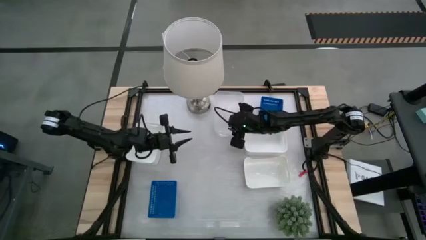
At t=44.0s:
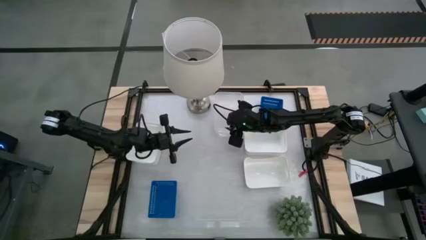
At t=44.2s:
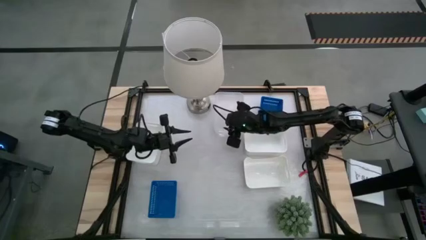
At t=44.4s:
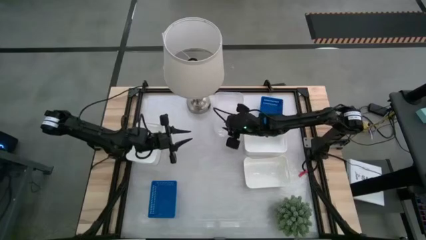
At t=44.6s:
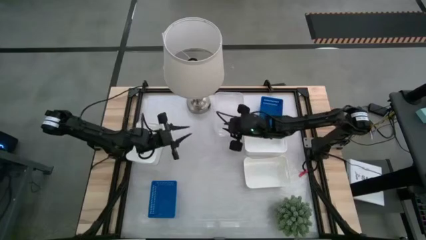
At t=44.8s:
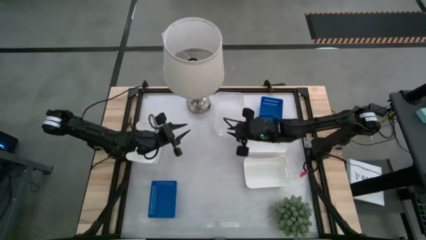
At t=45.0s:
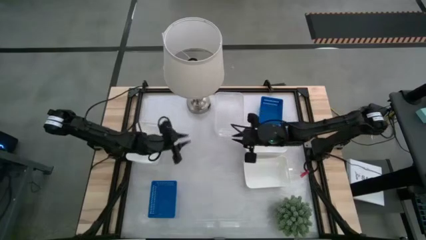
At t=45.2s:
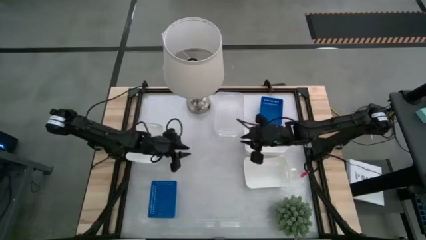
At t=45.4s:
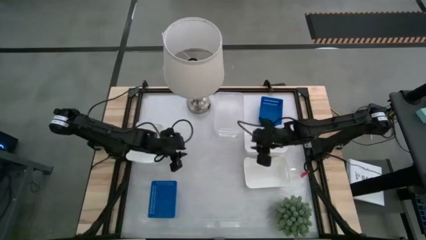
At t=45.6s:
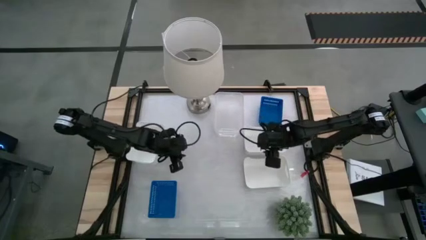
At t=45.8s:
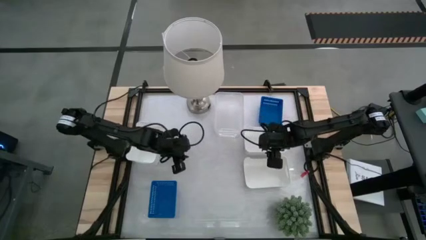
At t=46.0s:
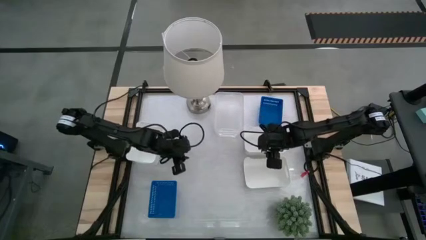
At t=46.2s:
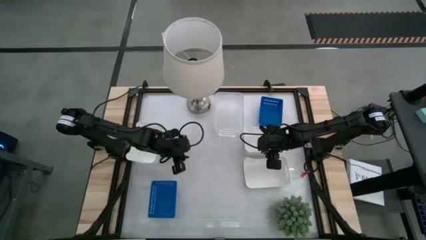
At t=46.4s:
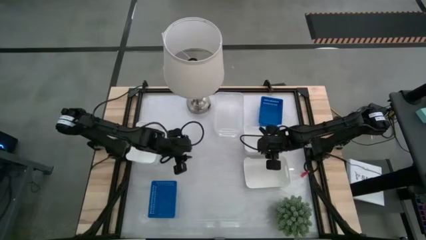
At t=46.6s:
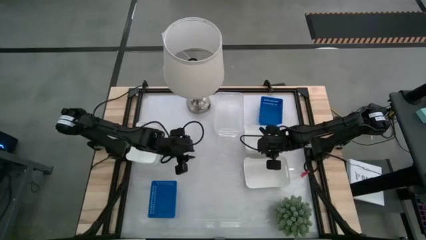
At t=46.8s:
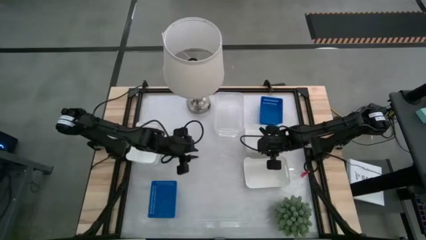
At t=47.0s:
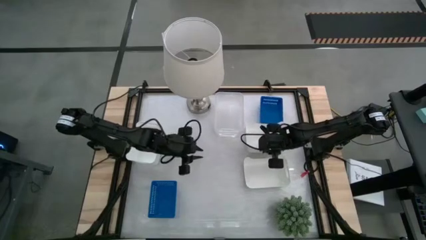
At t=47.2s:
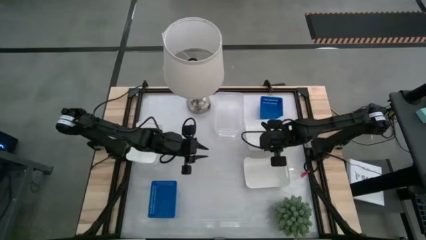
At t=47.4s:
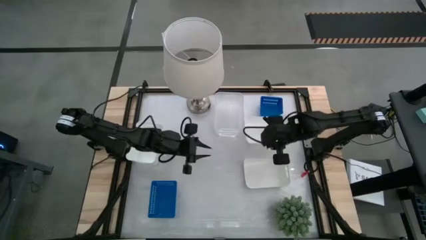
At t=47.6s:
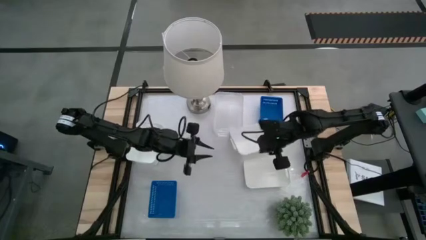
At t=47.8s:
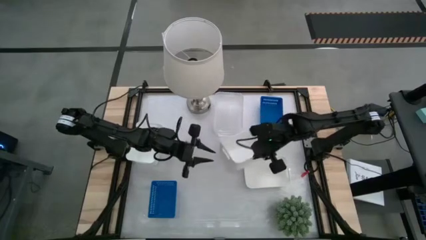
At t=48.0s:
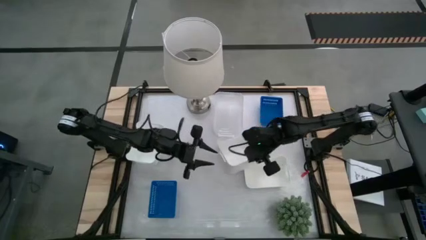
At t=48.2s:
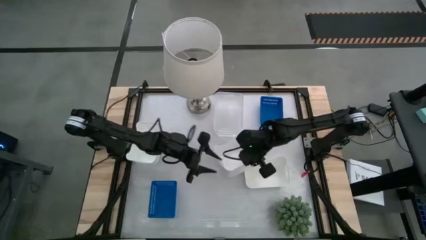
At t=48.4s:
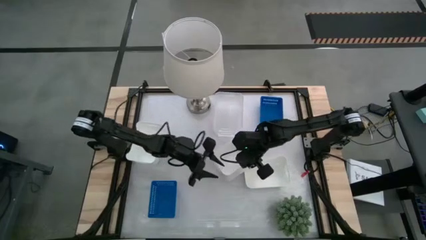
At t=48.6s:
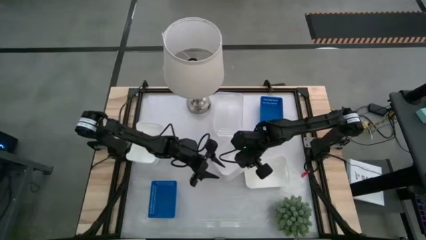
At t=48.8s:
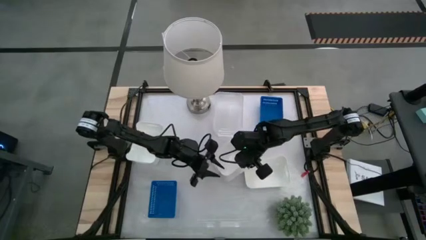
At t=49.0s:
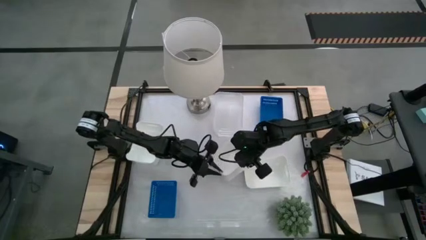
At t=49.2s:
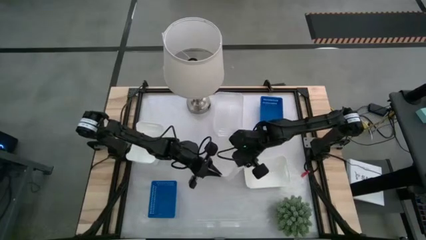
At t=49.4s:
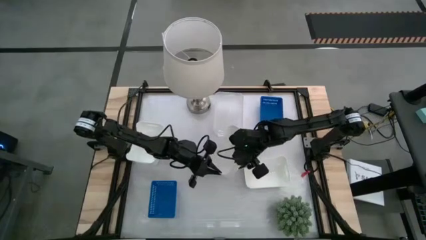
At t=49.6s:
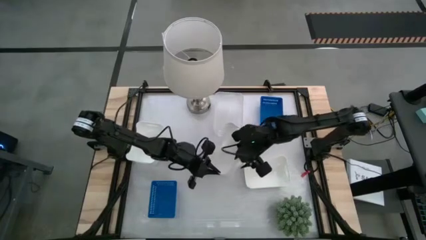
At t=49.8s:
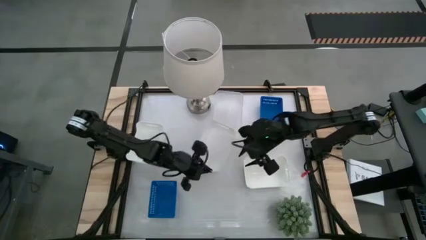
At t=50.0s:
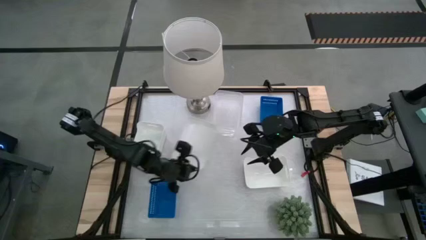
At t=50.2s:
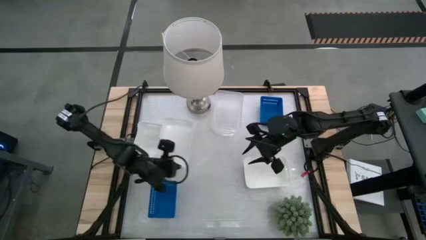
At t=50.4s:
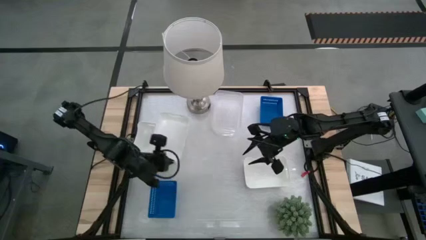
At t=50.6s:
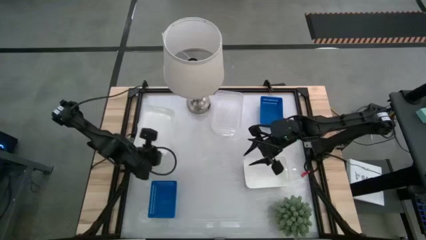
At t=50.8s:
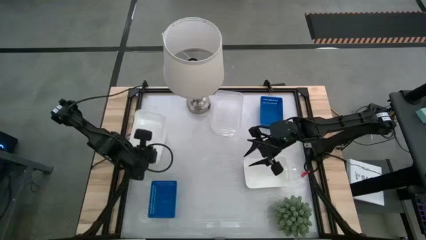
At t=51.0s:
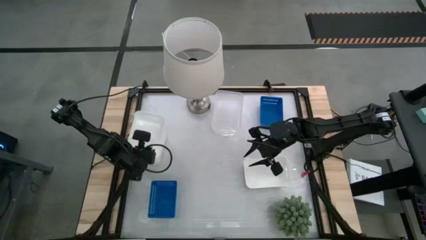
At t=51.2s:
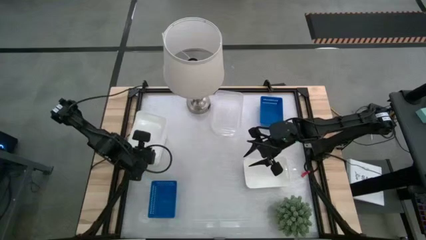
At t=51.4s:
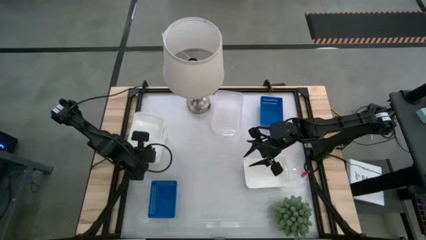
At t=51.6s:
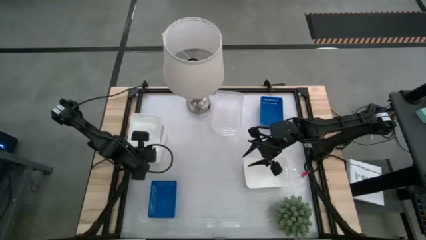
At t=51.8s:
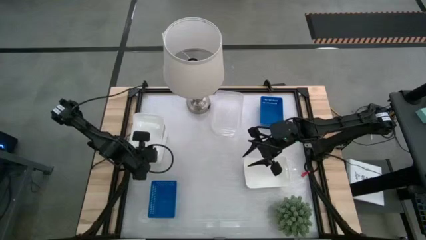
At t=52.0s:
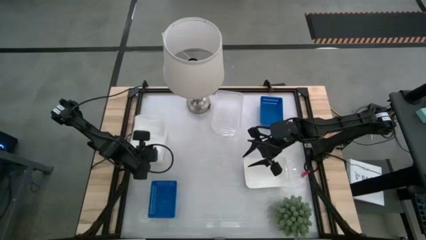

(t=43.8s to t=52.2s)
Stack the top right white bin on the top left white bin

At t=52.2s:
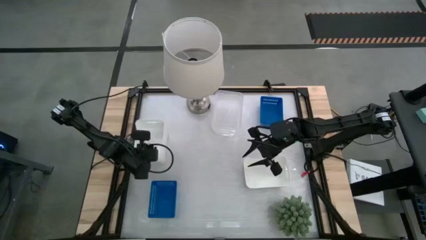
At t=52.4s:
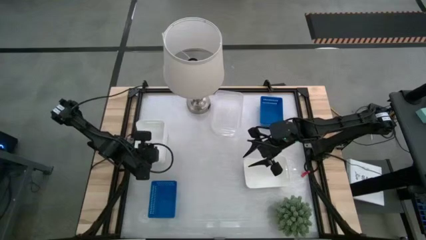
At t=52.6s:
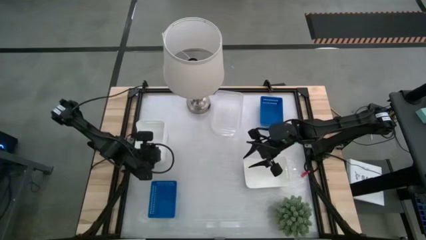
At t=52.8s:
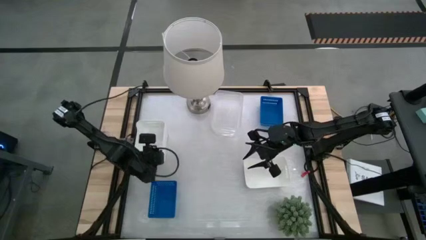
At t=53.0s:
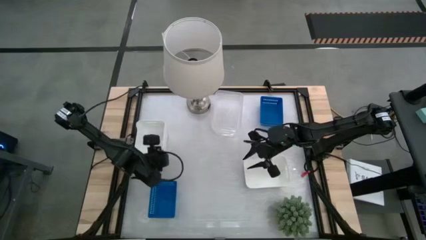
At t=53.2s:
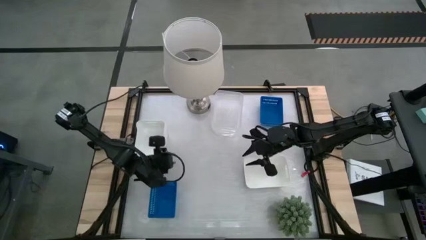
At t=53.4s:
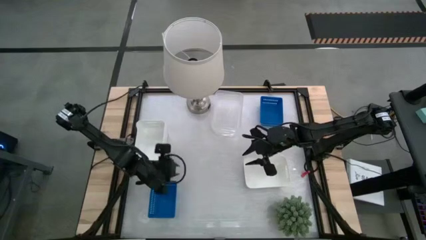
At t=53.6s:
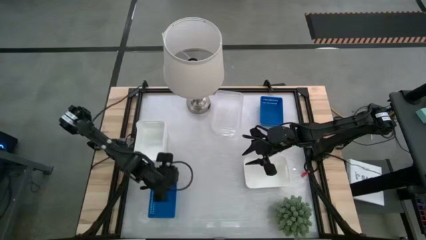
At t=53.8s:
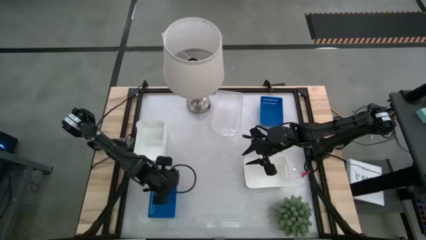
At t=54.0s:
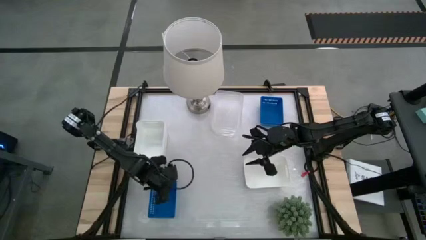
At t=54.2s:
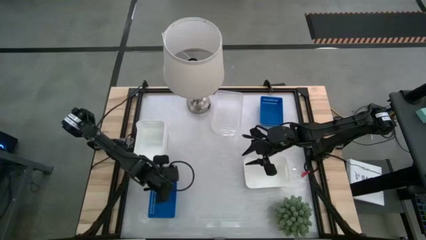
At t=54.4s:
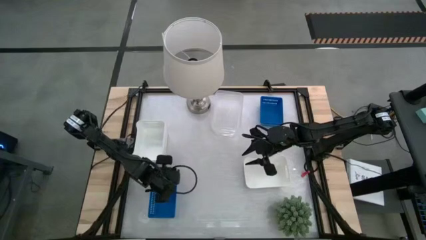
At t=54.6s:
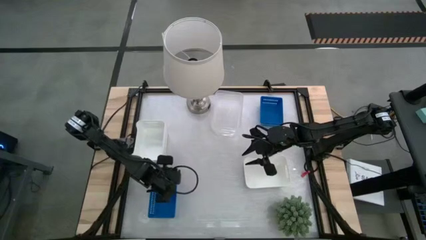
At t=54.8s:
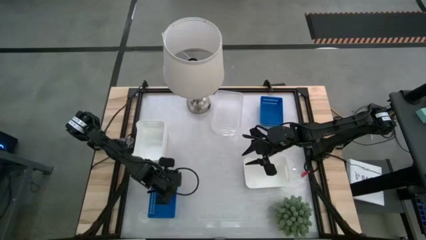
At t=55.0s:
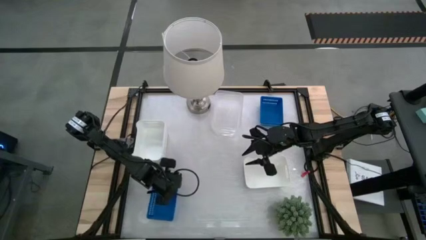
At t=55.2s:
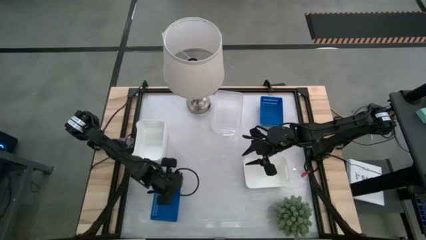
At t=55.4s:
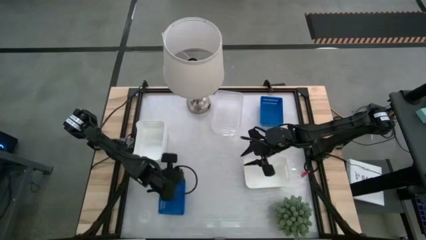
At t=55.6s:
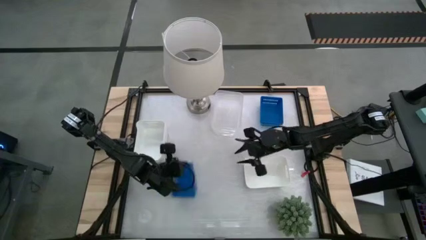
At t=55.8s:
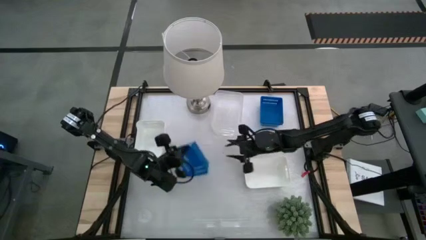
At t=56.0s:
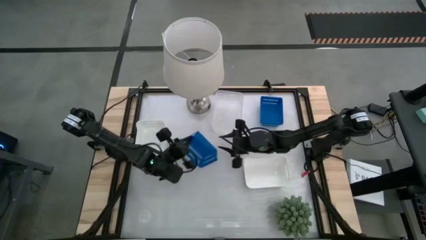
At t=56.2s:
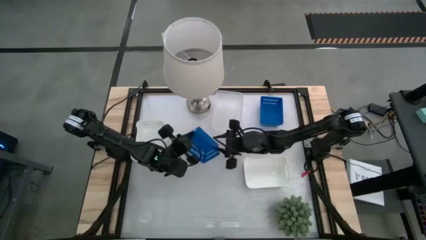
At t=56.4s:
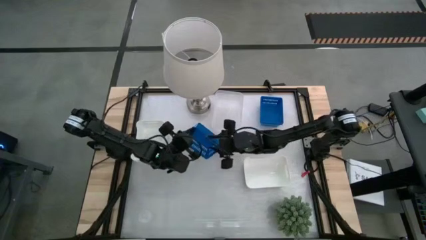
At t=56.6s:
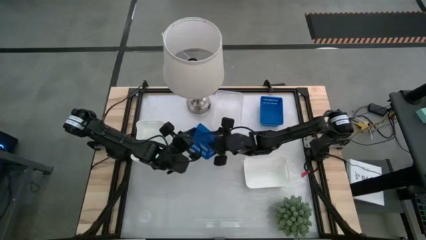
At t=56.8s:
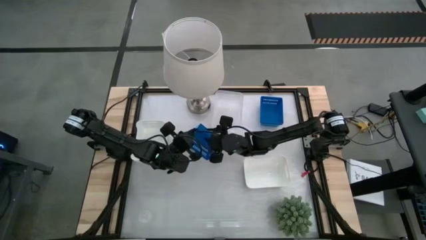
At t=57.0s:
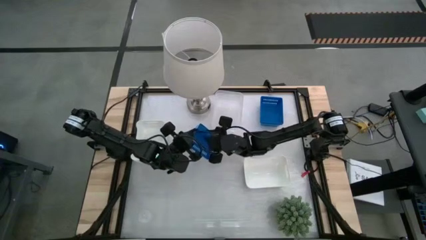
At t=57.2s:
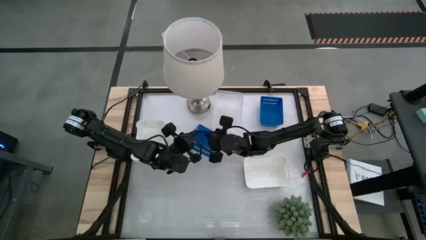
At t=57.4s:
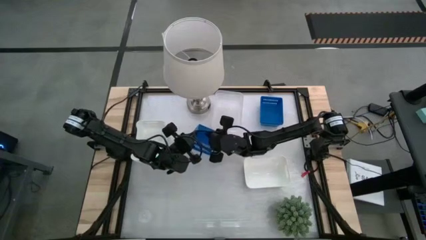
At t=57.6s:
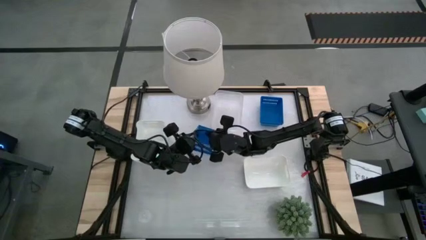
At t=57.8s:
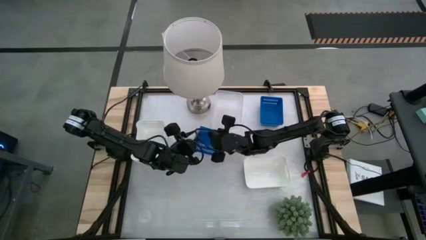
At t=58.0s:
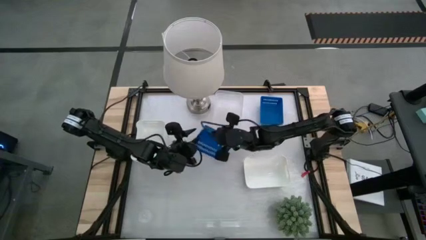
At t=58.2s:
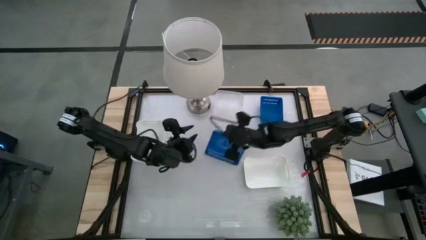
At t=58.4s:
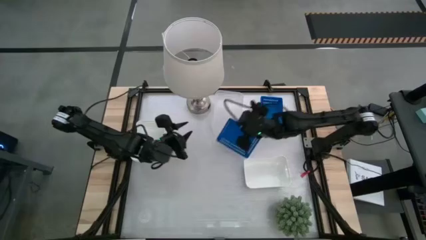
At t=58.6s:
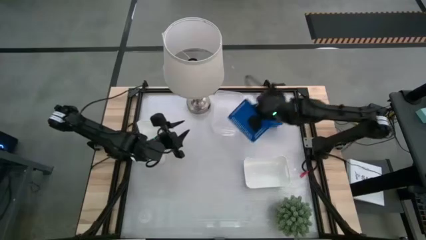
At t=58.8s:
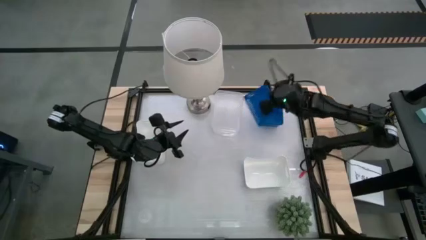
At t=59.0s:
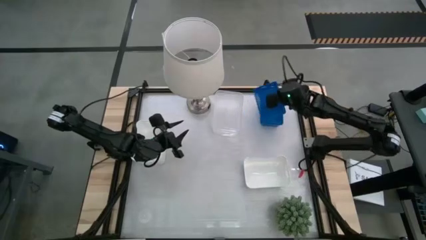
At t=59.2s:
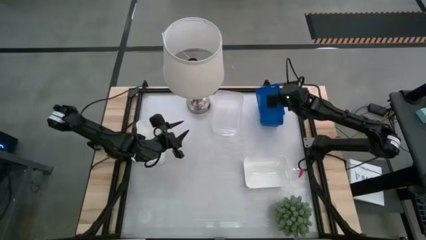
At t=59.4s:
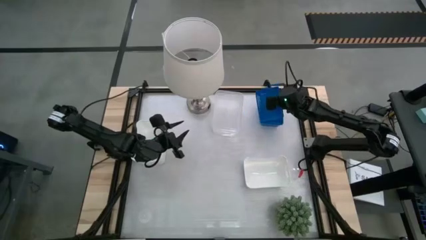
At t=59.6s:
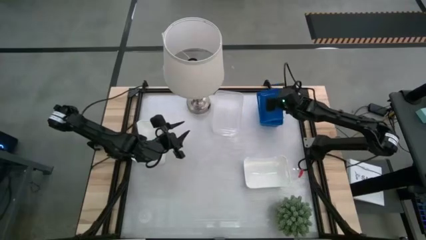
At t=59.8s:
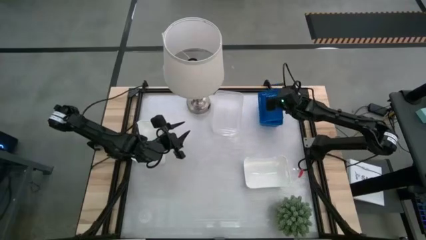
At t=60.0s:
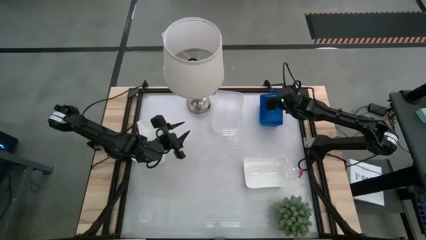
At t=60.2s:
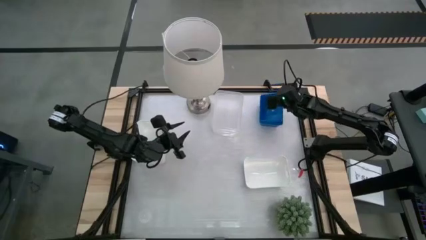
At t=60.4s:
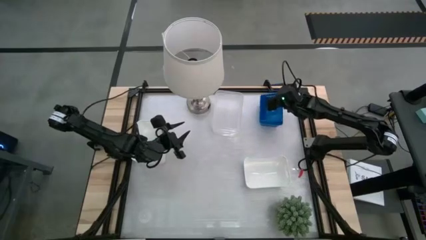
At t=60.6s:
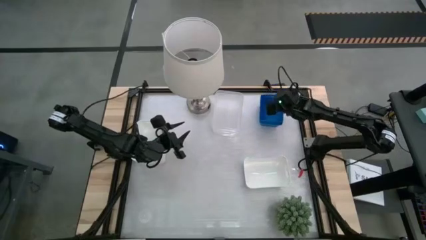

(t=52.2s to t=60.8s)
Stack the bottom blue bin on the blue bin
